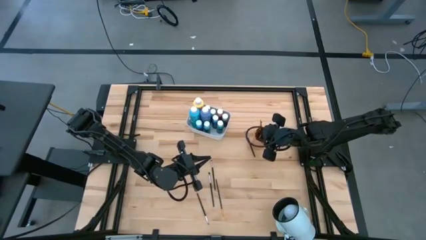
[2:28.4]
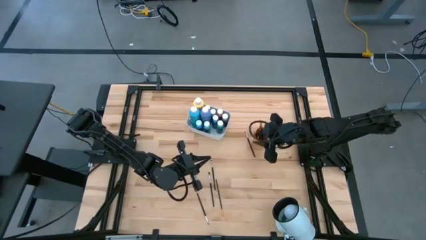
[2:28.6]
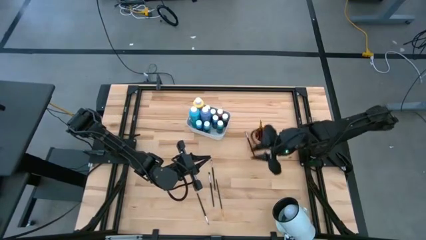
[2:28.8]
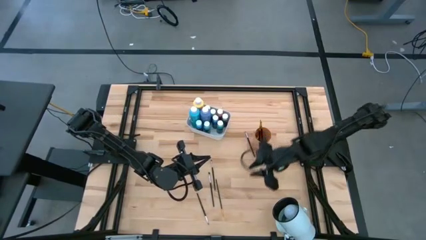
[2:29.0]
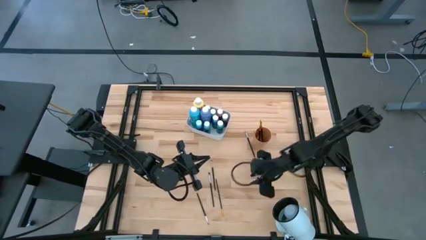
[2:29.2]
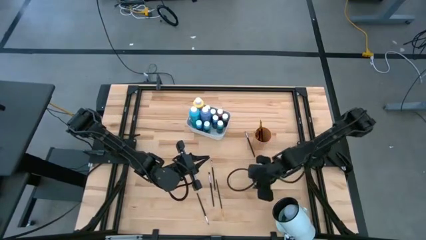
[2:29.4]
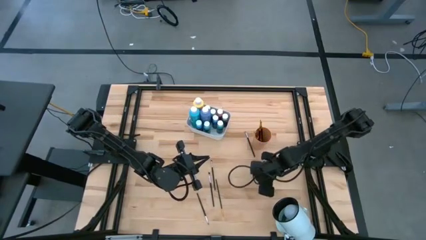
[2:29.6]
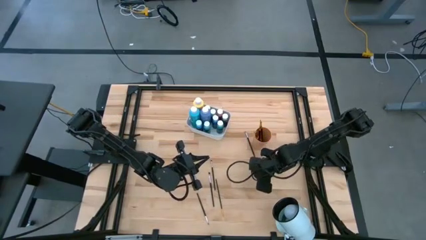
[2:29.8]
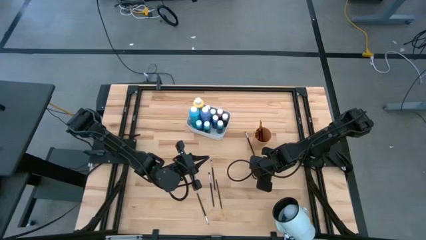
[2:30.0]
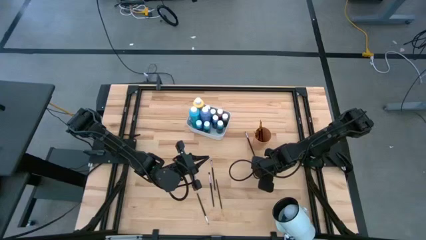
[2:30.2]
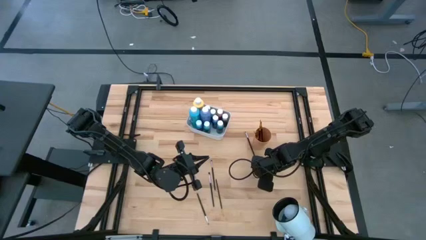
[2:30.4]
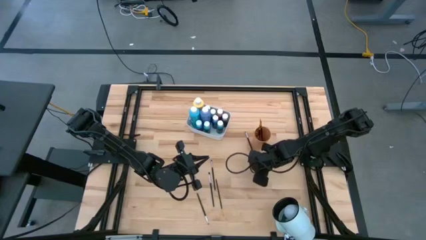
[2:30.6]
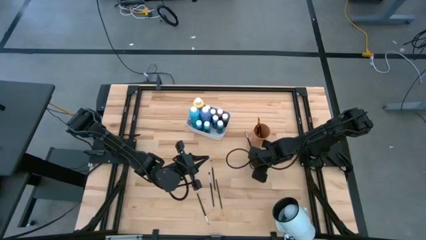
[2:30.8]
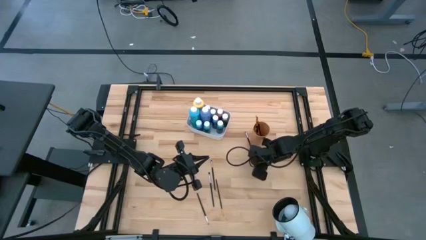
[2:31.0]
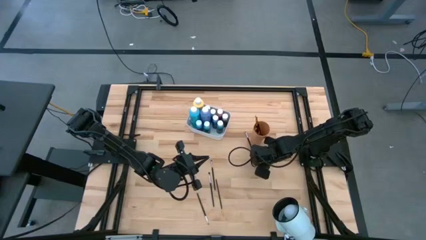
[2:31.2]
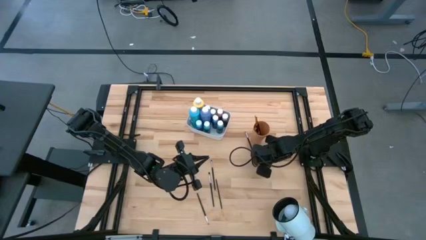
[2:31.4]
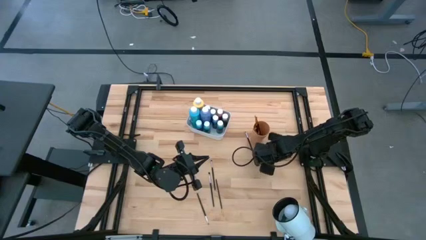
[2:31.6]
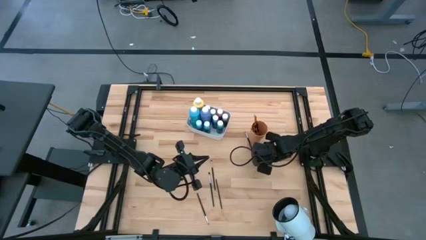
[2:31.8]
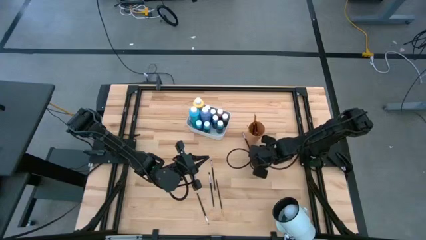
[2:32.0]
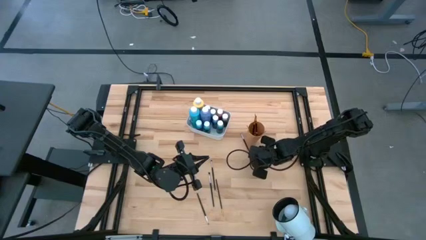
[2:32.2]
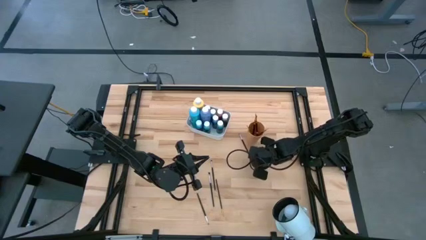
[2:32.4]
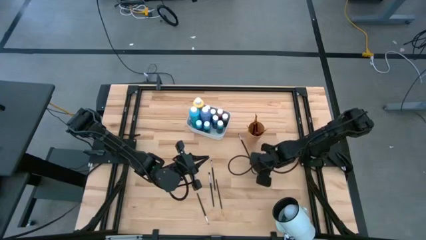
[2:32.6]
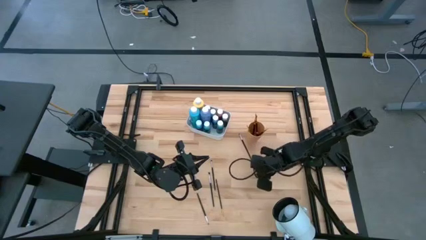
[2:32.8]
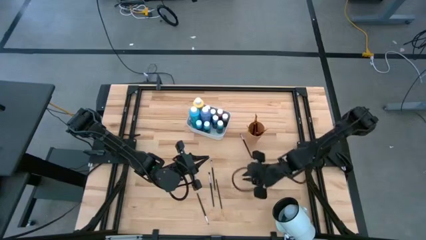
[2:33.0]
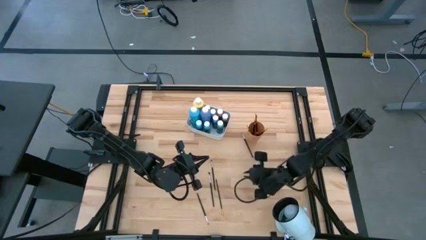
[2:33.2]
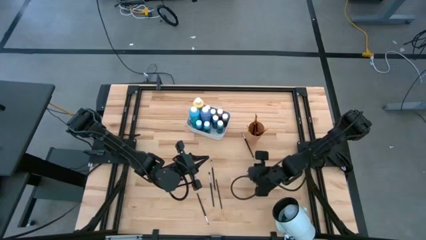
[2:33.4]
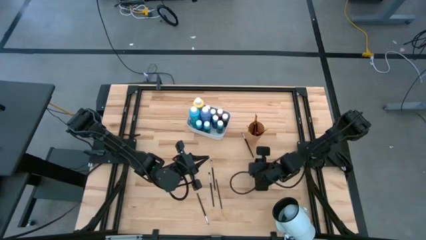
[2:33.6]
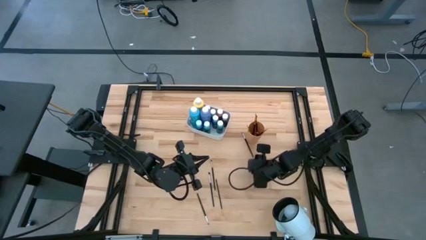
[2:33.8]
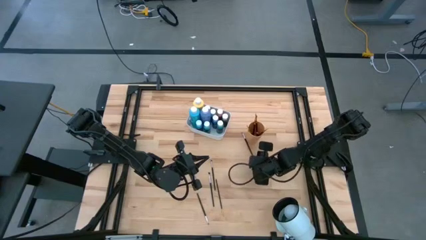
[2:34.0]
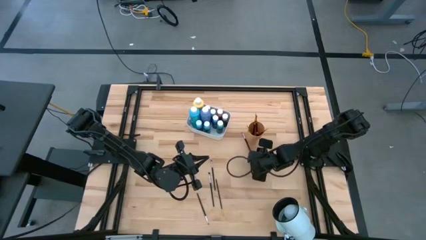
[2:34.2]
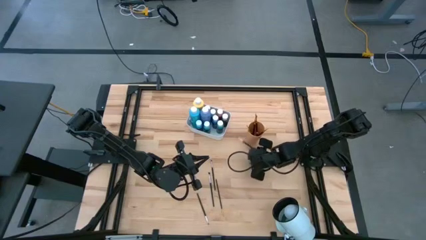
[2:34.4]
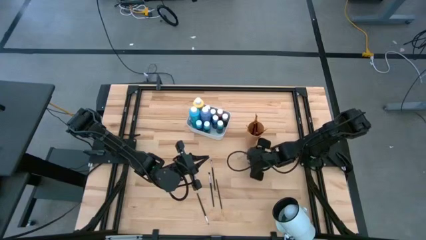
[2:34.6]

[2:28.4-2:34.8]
Task: Pick & Place Paint Supplies
Put the silver paintbrush into the cup

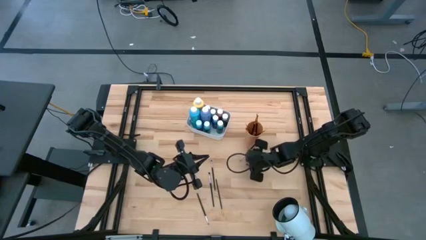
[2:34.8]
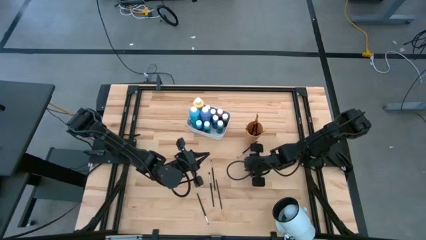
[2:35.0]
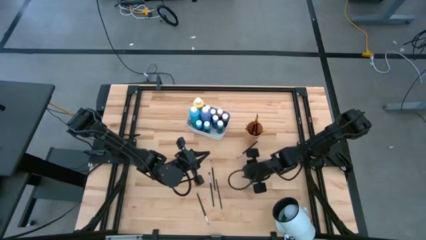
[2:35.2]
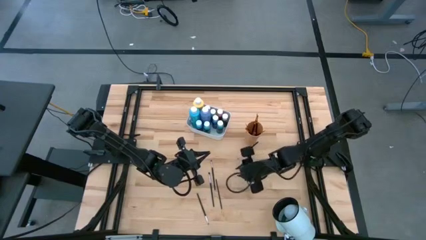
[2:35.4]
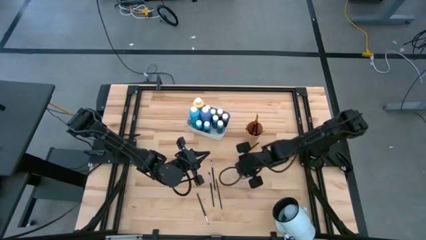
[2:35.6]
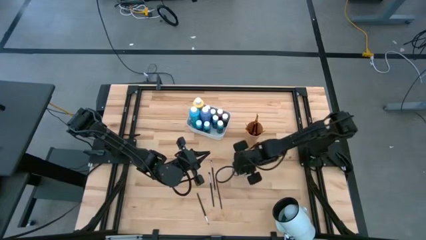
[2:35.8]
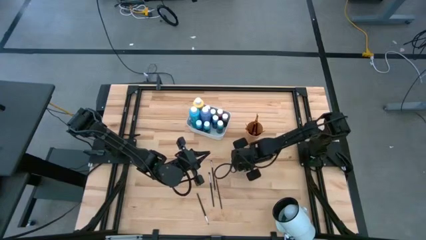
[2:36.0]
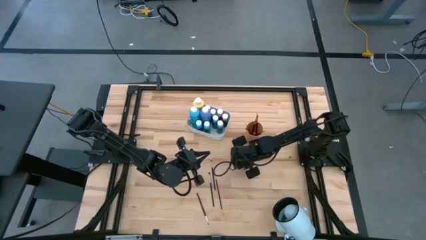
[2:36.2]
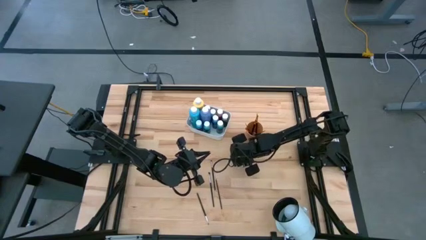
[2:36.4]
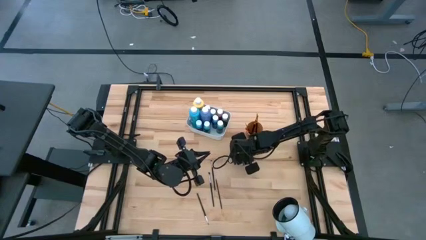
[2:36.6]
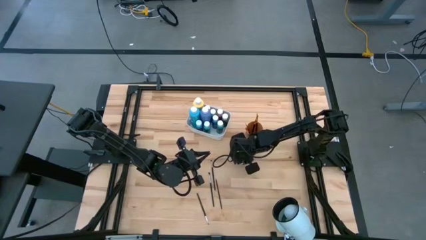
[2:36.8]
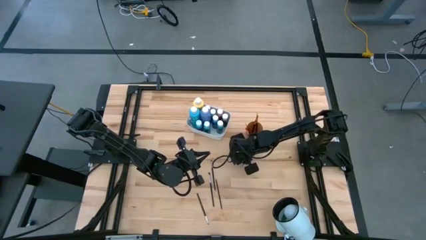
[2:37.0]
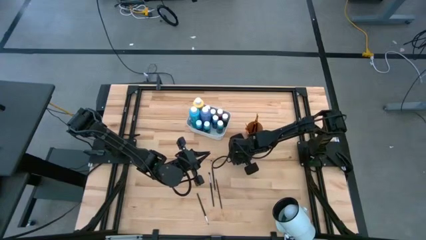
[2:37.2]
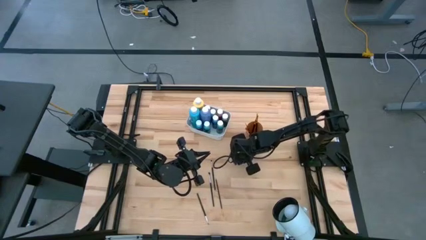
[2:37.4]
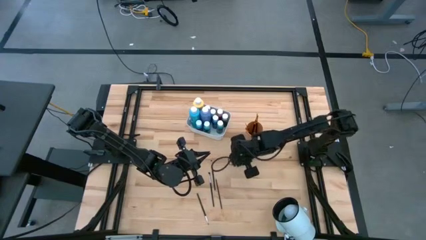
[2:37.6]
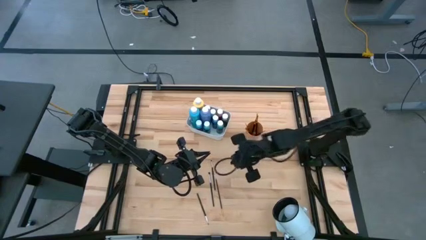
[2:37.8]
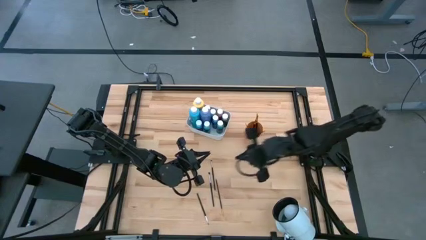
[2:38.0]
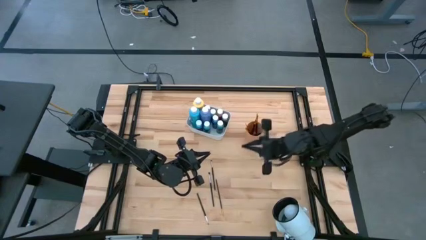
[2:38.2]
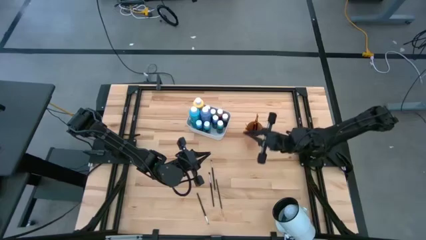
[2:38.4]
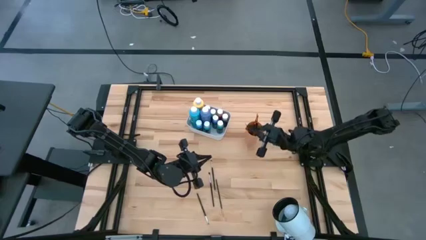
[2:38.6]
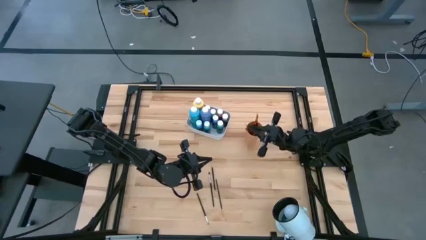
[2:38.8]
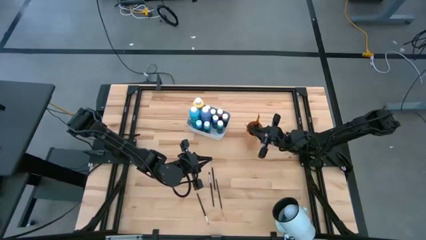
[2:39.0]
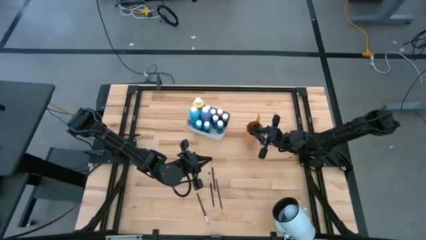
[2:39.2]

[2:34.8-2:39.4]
Put the silver paintbrush into the cup

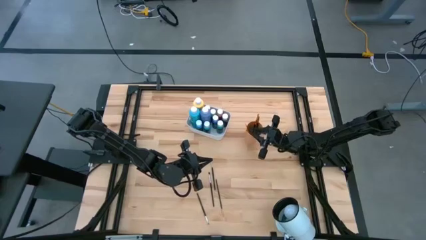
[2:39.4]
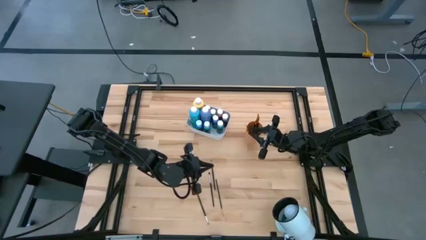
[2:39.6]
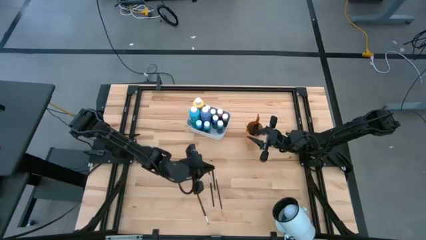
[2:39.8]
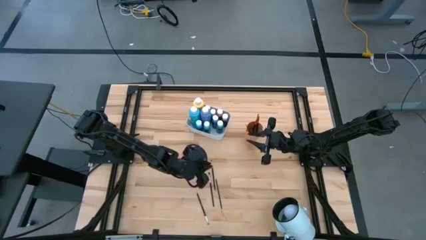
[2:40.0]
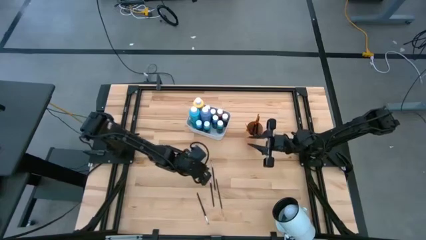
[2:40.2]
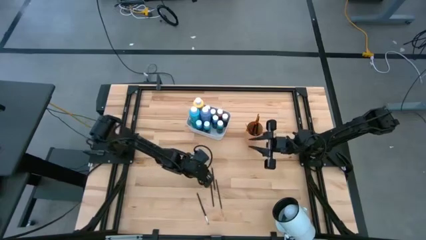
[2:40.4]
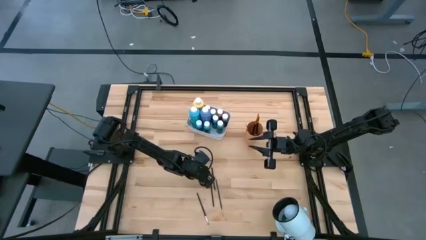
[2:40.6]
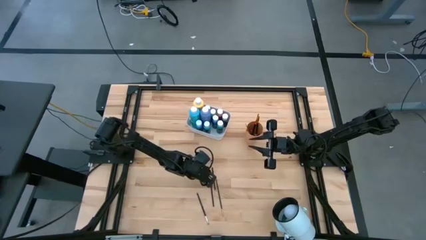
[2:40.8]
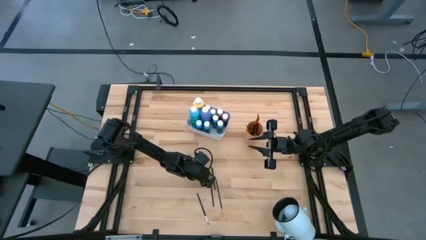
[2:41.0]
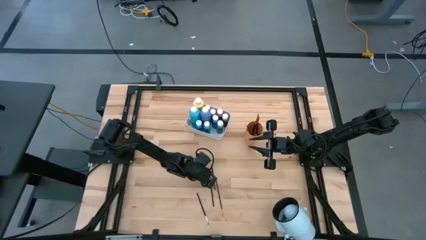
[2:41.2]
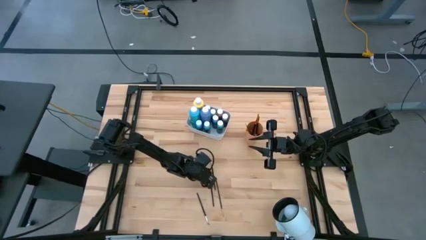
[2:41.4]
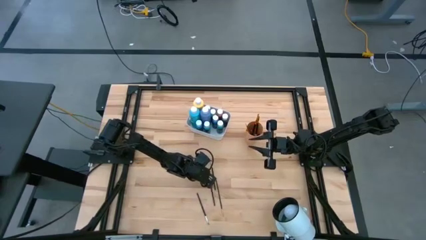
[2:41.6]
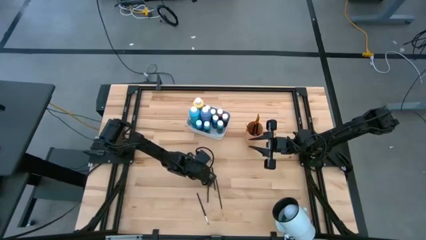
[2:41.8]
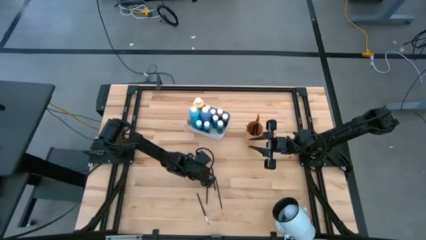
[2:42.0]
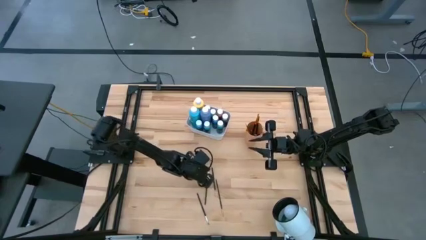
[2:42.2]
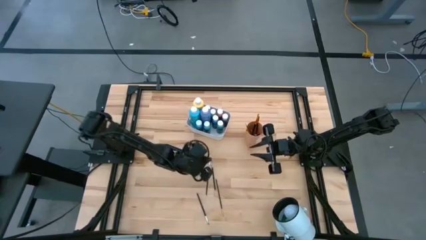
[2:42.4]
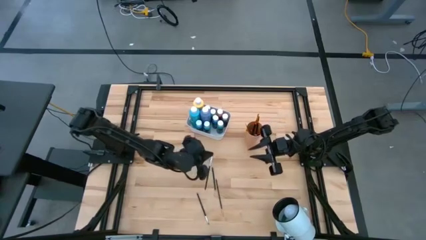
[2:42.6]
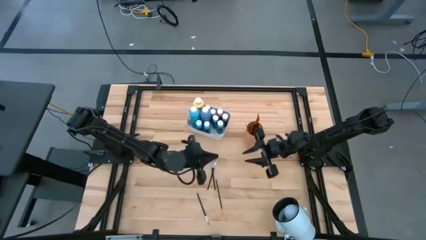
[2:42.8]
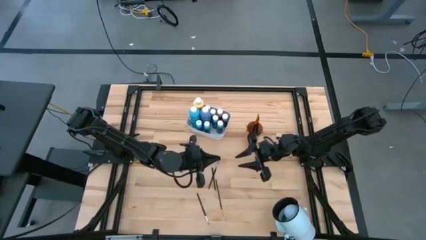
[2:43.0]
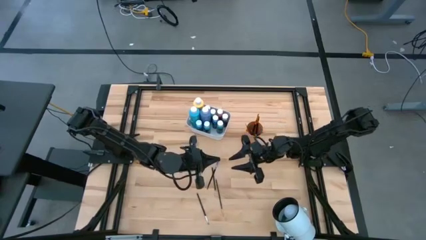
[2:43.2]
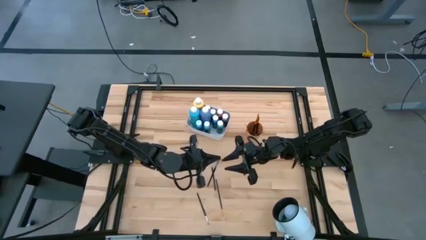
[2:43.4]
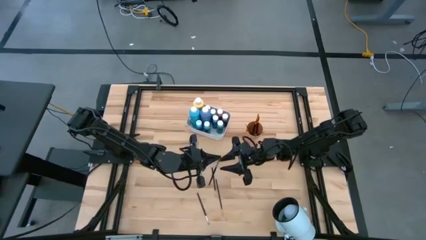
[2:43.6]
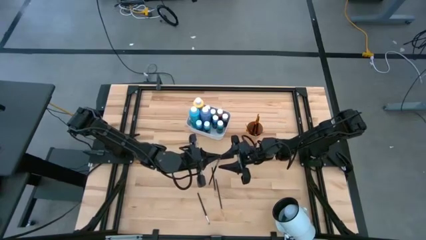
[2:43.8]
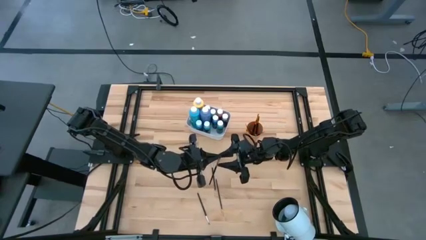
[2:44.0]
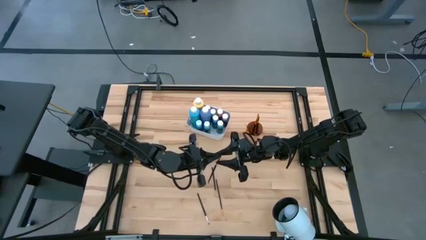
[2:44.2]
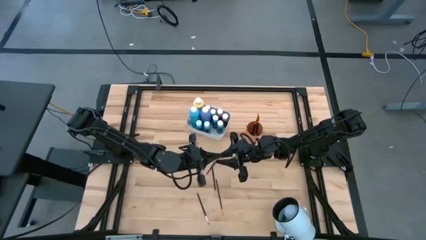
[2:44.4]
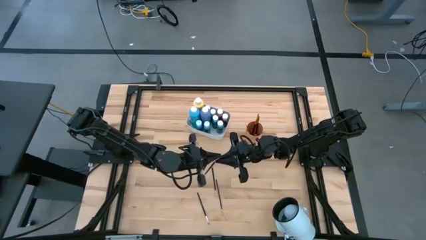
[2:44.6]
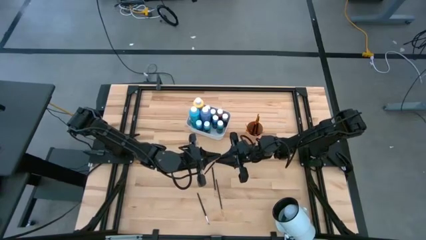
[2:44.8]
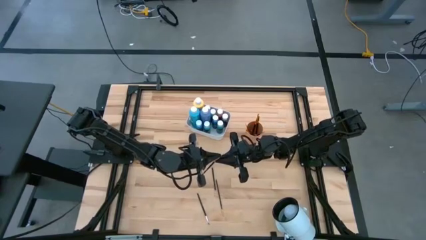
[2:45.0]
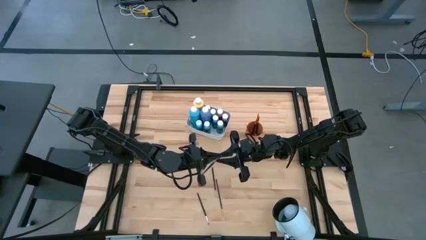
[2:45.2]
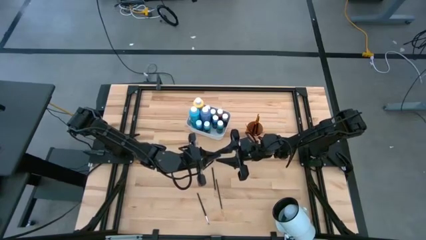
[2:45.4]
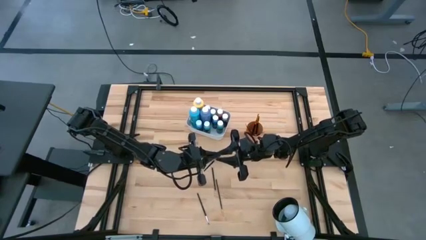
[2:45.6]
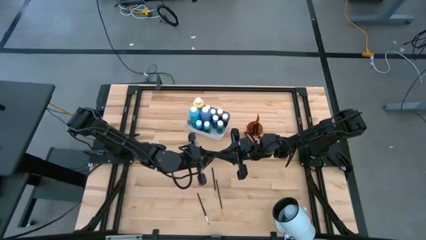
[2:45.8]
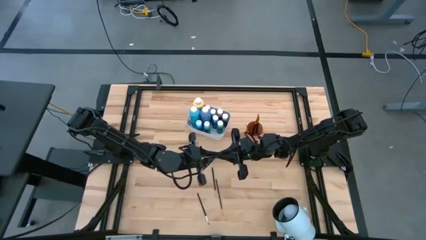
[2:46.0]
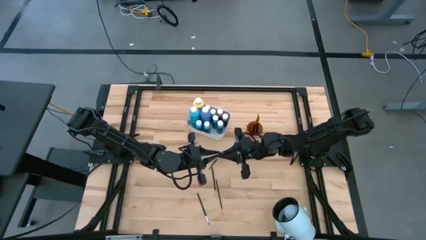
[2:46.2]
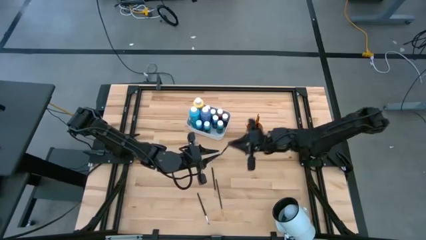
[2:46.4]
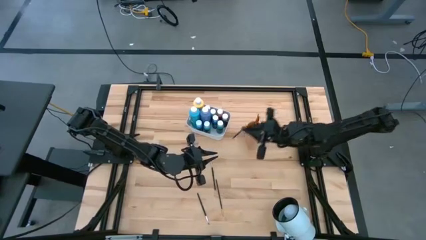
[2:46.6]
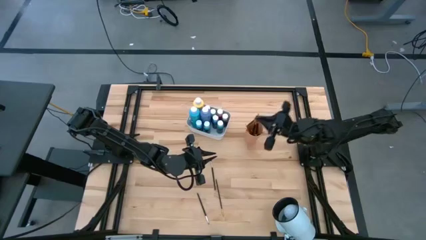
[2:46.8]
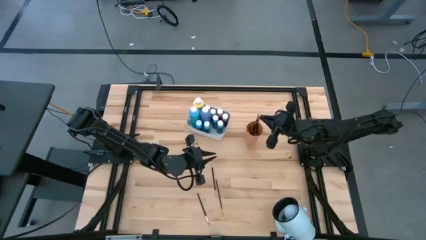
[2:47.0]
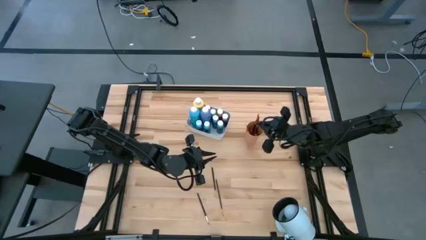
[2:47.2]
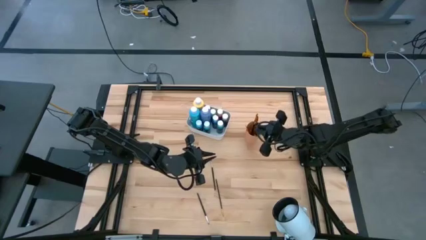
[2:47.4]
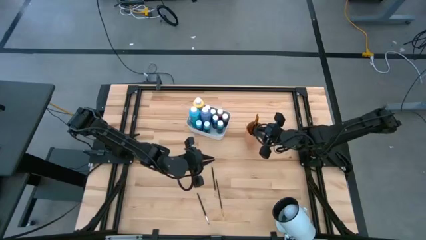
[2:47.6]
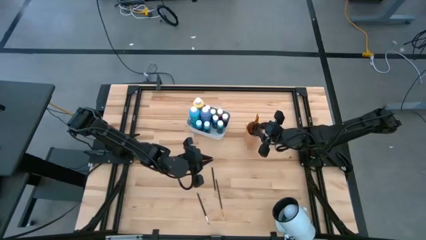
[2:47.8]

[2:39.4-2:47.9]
Put the silver paintbrush into the cup
